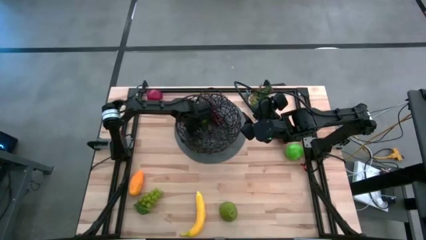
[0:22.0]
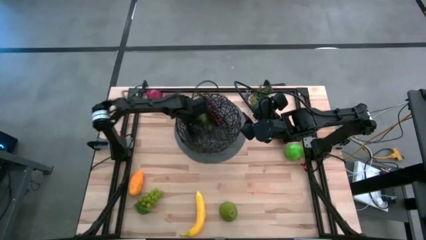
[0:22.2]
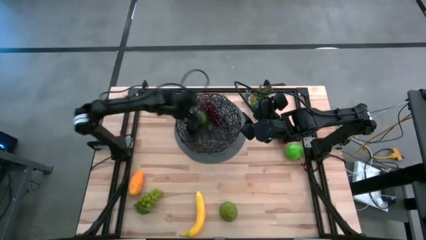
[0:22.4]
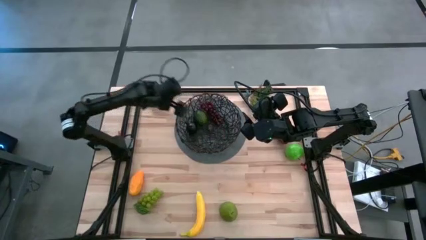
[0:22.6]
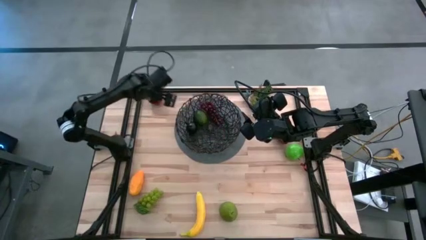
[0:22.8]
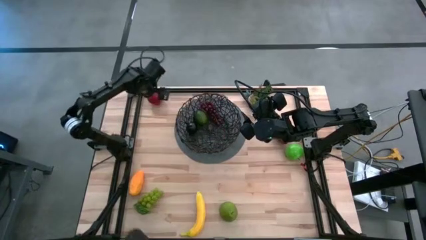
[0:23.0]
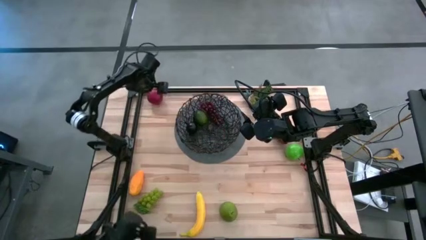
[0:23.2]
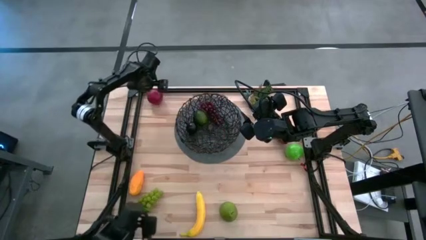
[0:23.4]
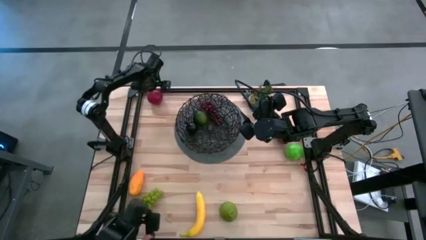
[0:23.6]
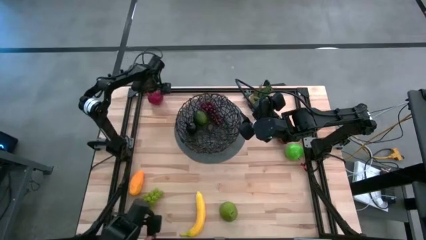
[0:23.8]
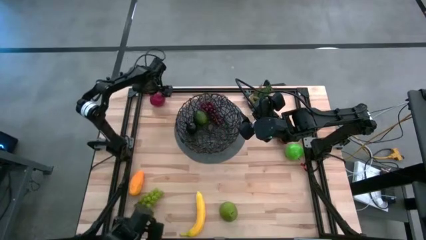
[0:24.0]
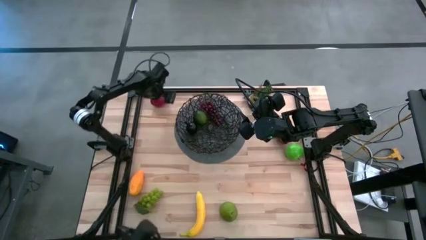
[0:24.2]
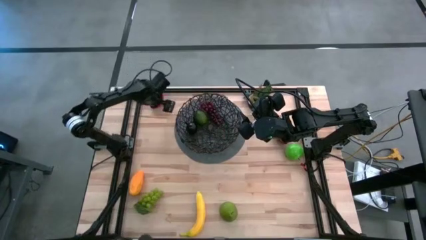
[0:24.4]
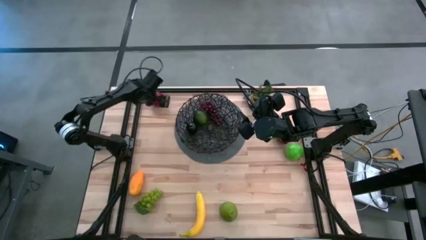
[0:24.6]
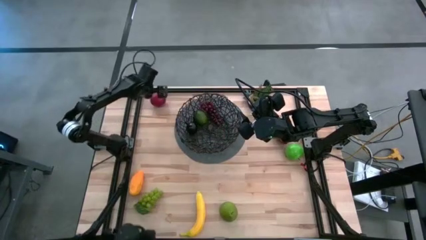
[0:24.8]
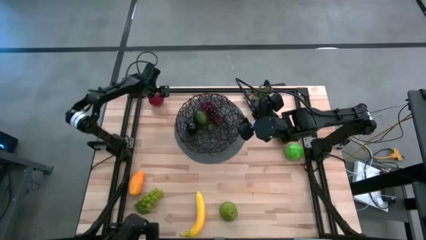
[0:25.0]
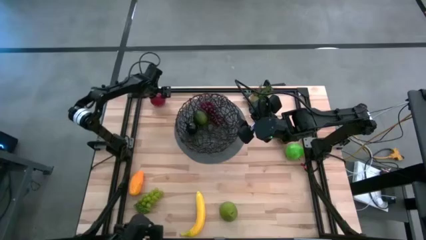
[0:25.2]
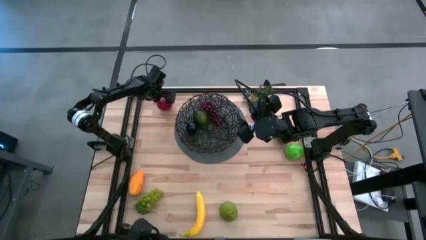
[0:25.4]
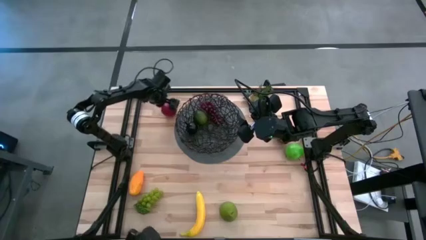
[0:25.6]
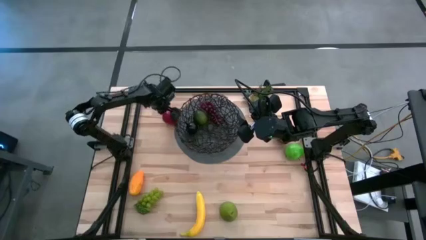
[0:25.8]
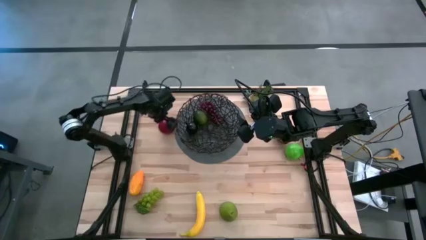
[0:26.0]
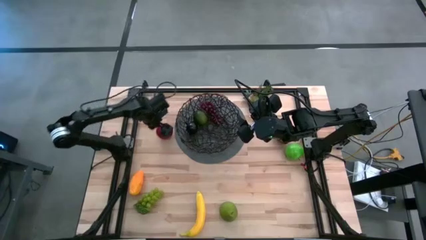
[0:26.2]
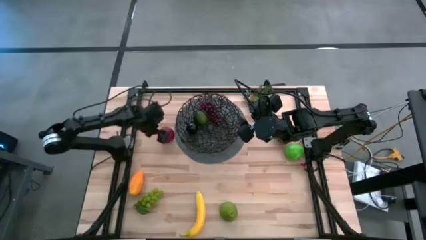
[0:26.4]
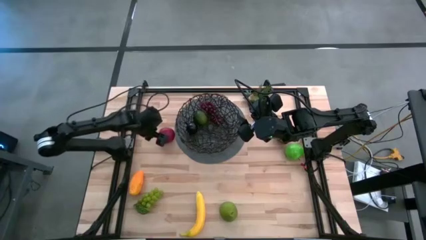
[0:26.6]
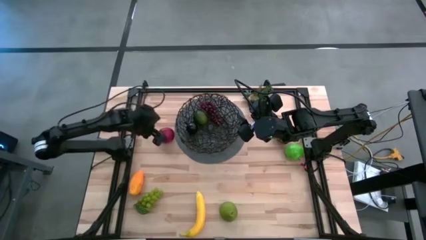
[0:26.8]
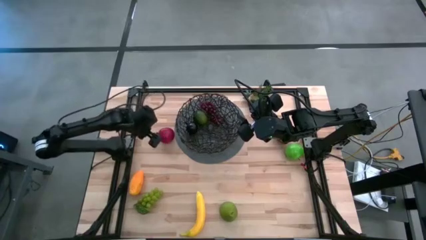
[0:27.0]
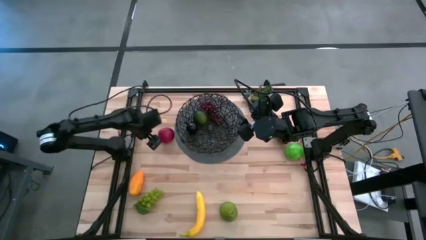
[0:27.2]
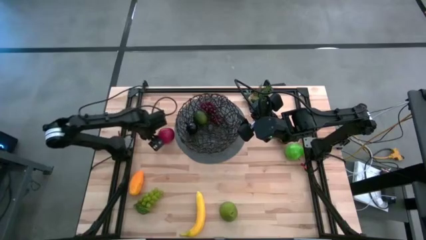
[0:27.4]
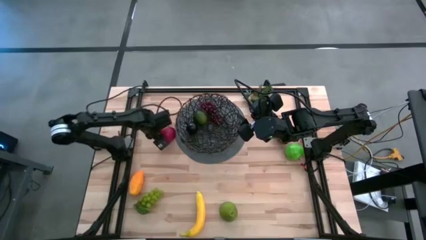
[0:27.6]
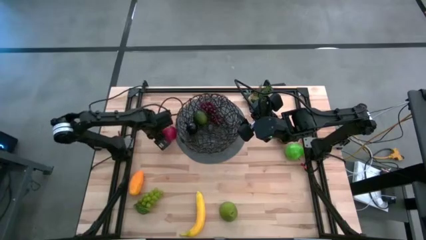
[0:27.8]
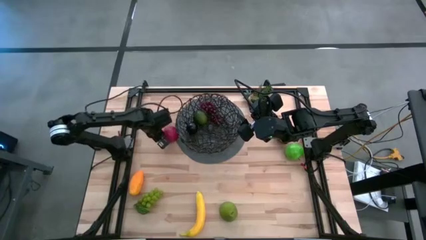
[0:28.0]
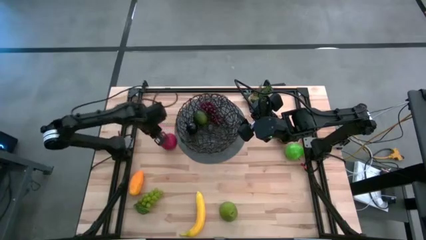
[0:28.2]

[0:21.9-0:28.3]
Task: Build produce basket
Put the red pomegranate into the black basket

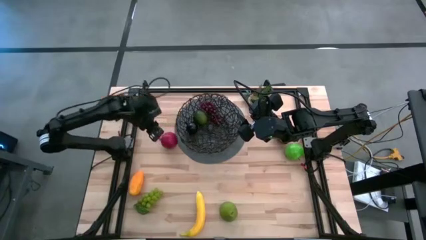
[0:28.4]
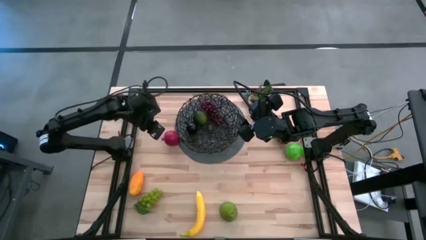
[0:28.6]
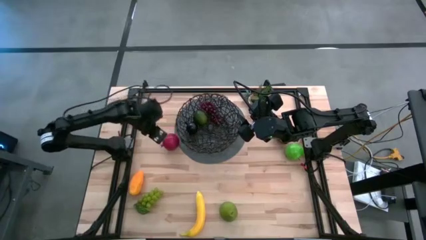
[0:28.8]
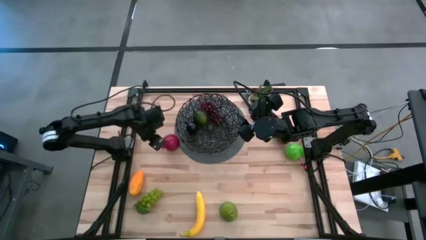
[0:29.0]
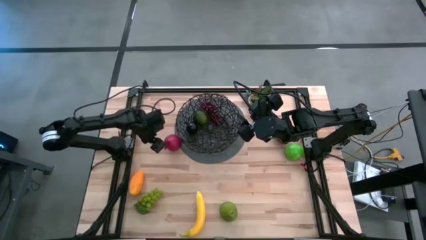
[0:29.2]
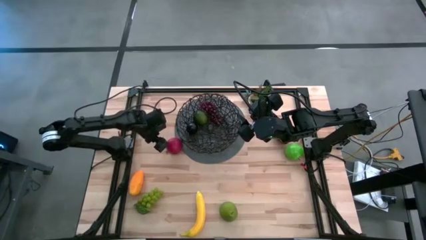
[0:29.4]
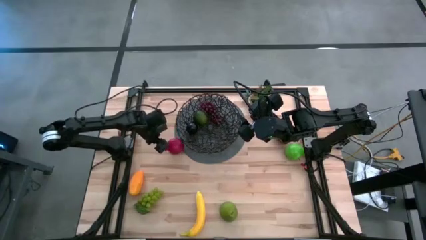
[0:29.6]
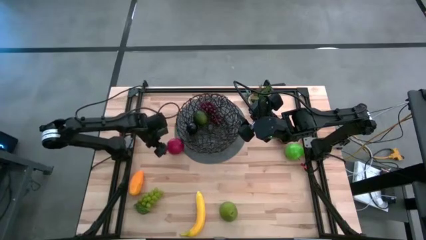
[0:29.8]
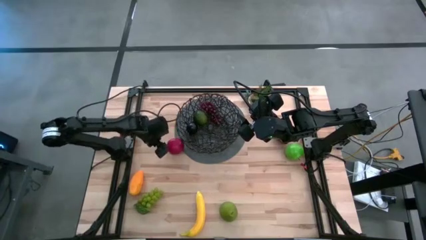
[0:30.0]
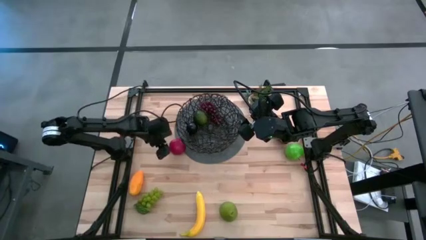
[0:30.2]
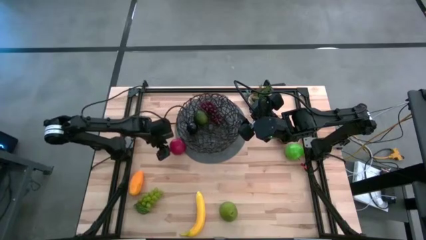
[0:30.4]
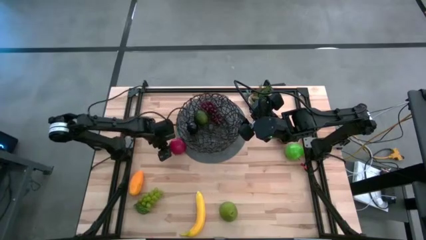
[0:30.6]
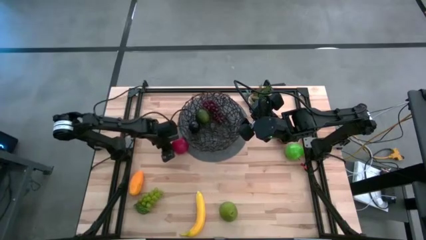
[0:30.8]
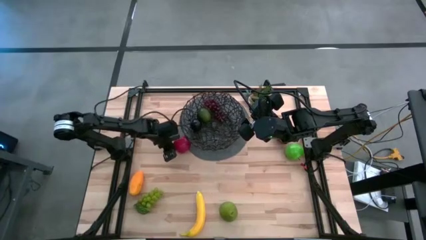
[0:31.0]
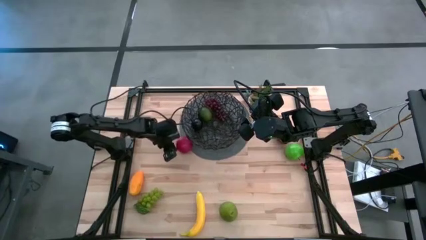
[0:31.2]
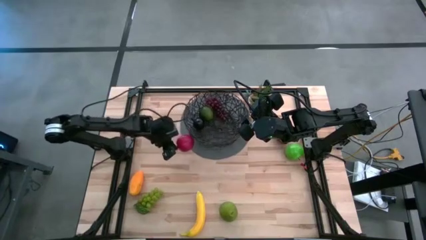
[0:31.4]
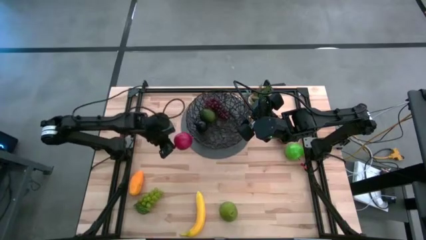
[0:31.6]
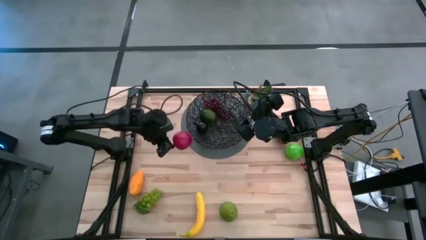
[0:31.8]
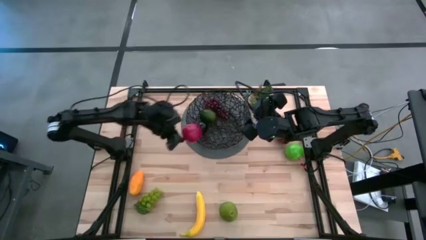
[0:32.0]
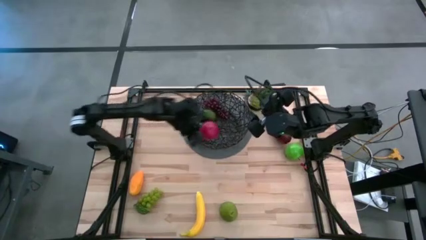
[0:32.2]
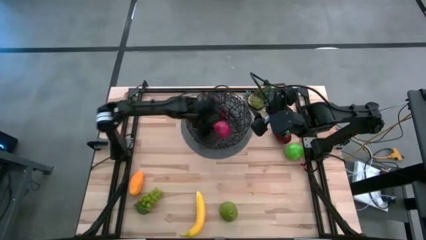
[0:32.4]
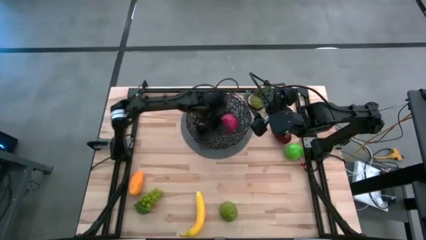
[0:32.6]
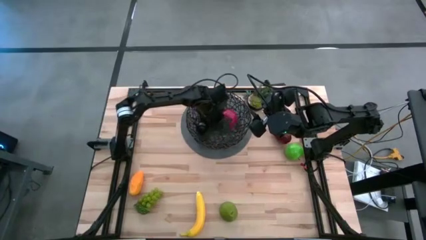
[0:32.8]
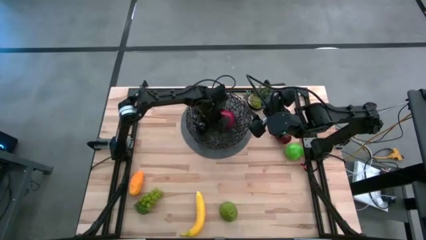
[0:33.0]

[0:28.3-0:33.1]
Put the red pomegranate into the black basket

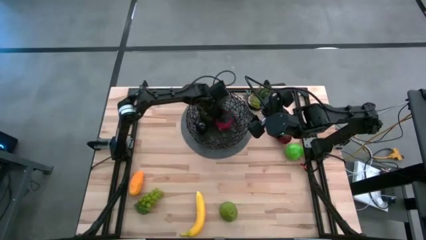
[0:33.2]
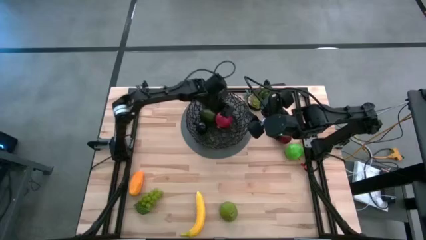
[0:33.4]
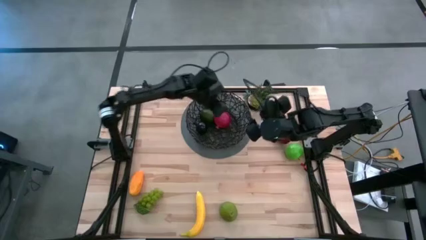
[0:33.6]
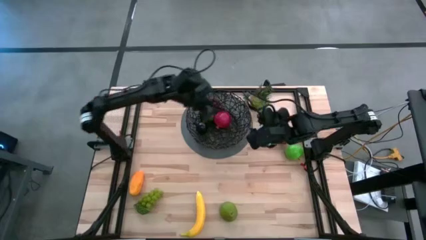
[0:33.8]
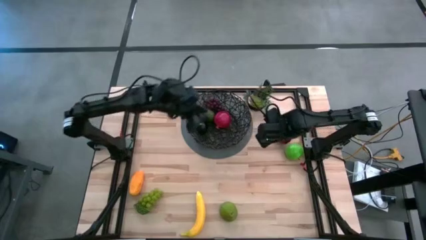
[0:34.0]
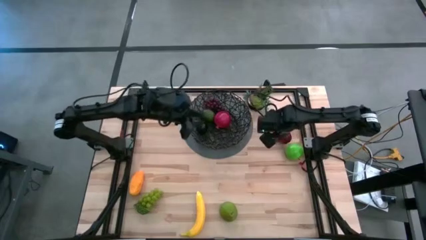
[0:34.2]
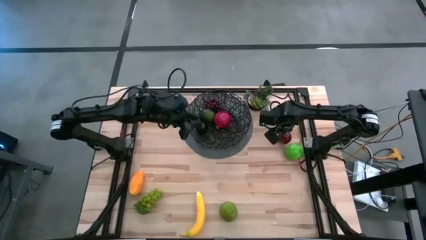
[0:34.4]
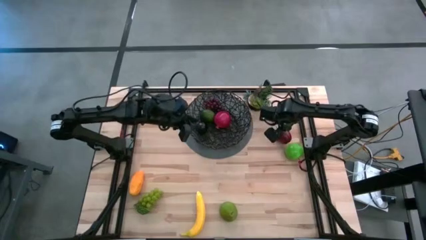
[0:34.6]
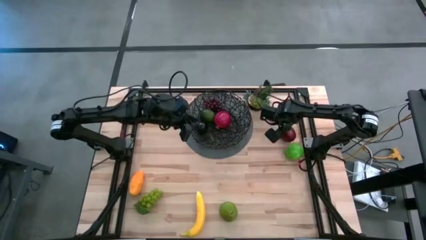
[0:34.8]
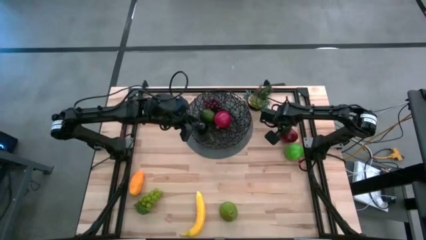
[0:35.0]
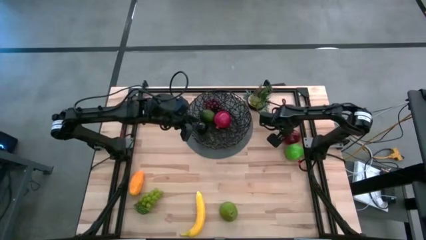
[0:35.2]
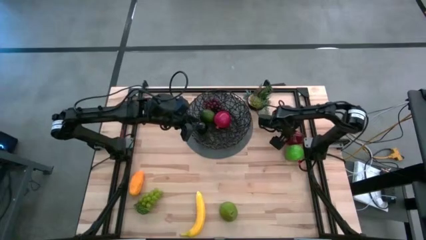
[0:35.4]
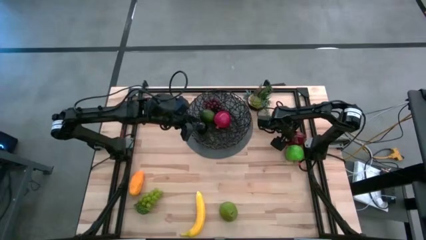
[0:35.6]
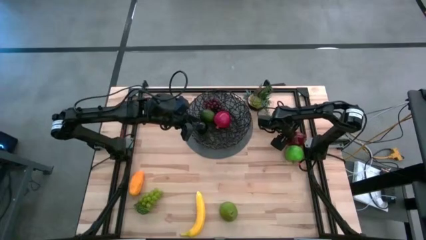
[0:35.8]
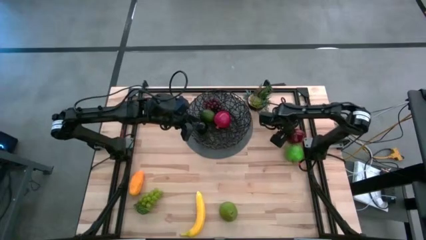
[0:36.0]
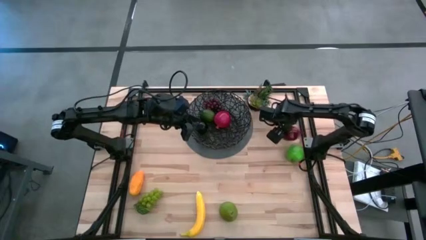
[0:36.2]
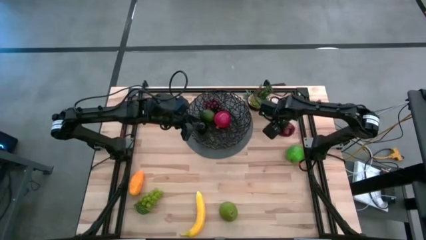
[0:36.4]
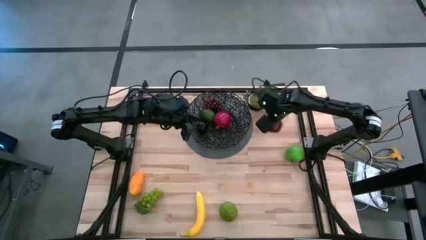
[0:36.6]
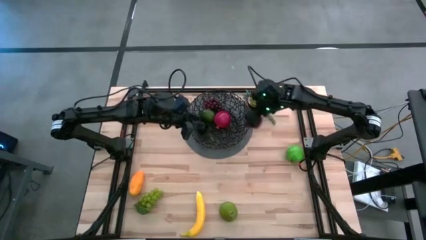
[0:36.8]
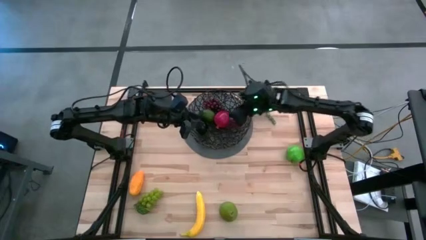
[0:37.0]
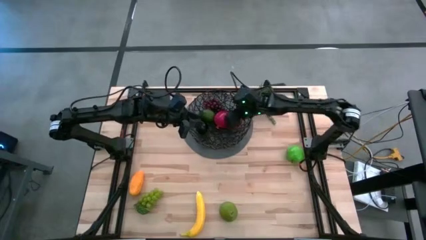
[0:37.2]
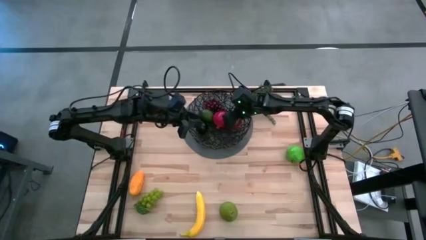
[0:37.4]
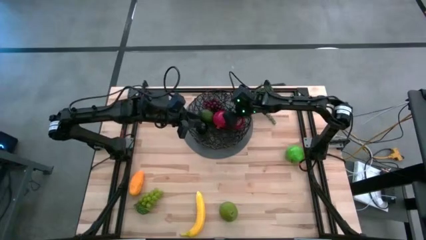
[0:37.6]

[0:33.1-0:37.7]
Put the red apple into the black basket
